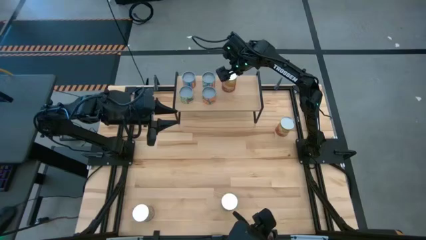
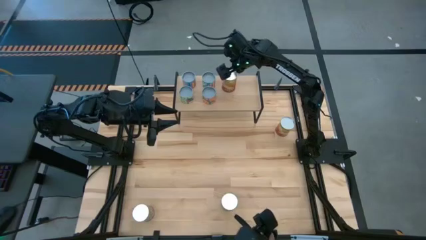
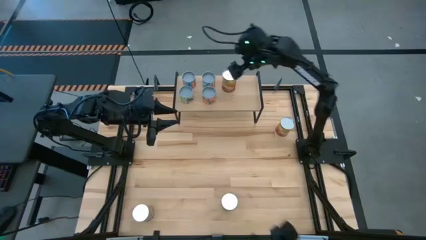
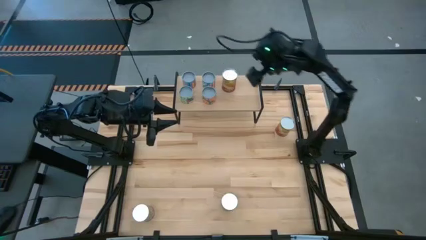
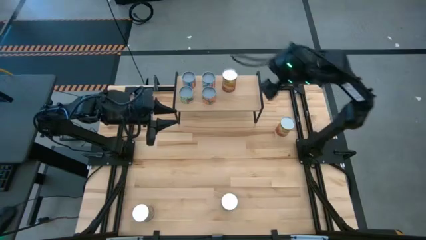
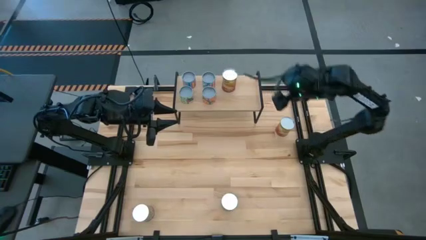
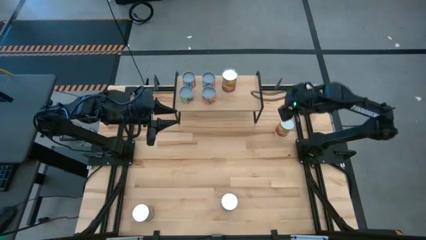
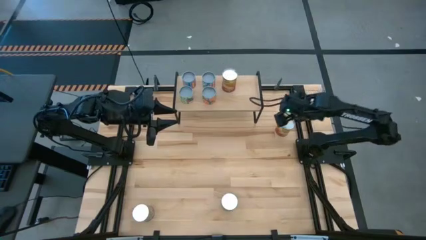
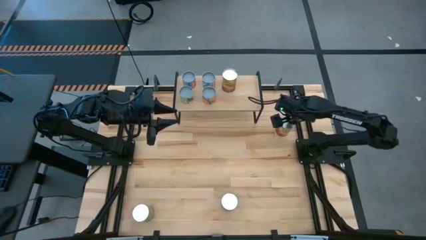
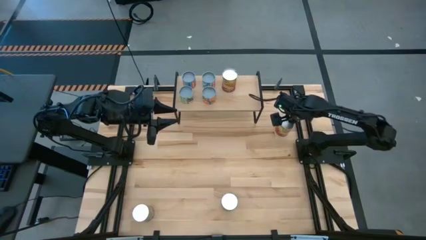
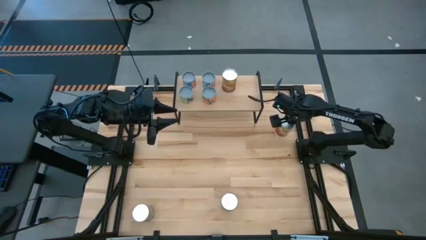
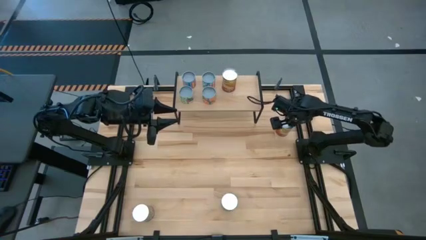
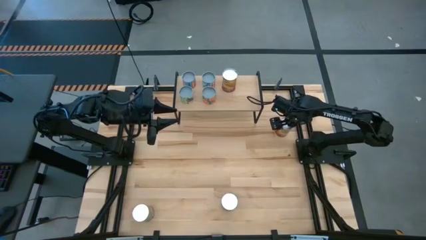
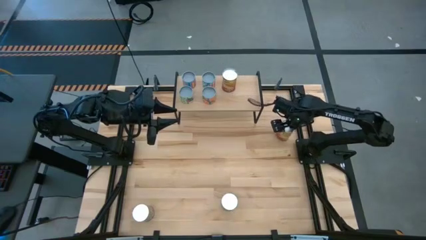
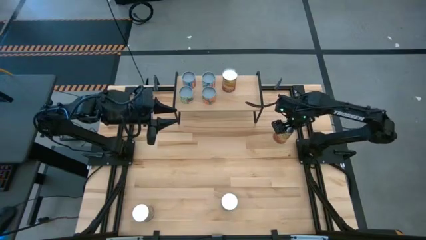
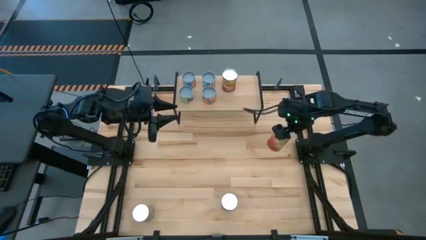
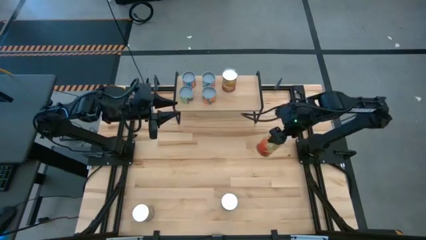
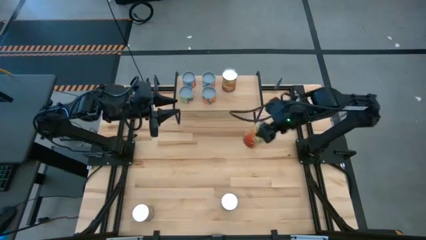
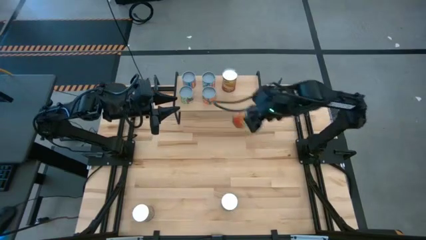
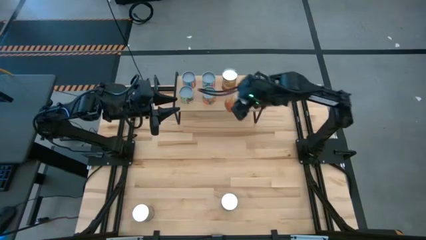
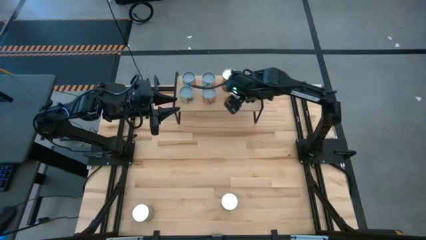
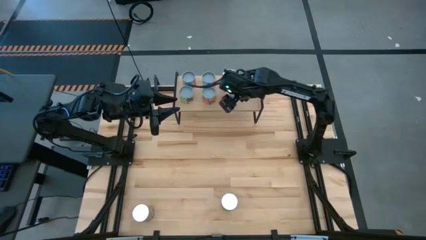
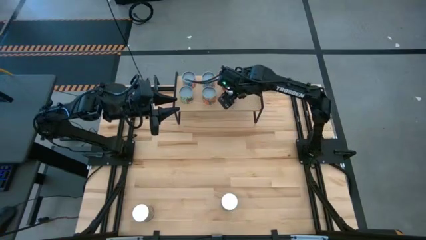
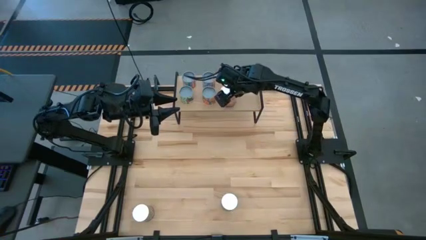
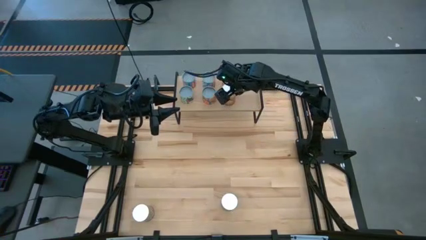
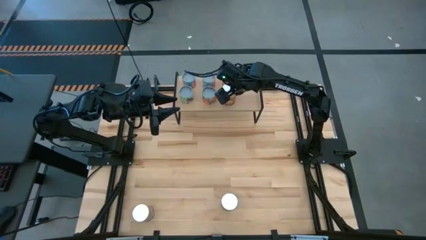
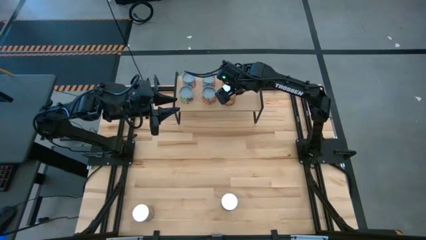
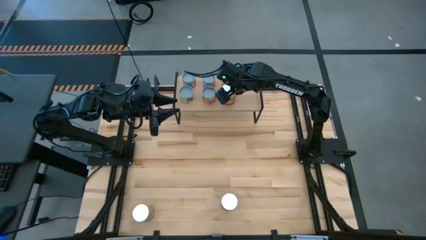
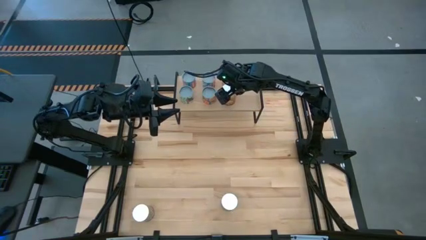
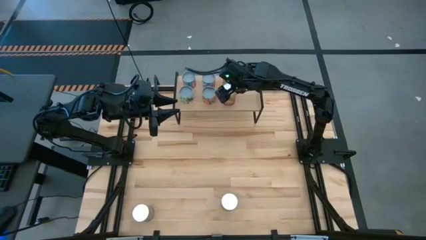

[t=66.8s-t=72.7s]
Task: Pick and place cans onto a shelf
Put the can of corn on the shelf aligned with the other can of corn

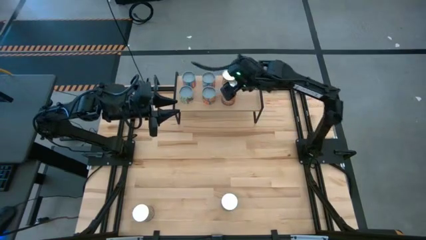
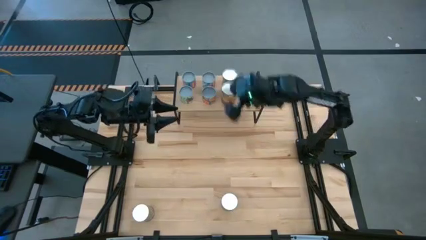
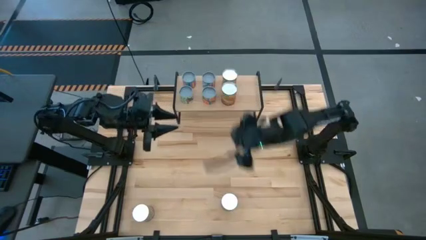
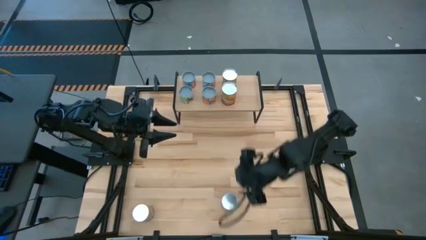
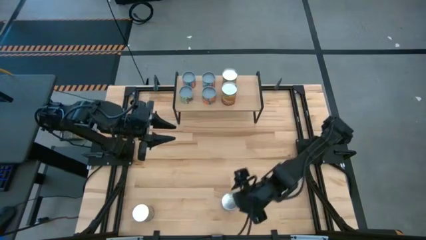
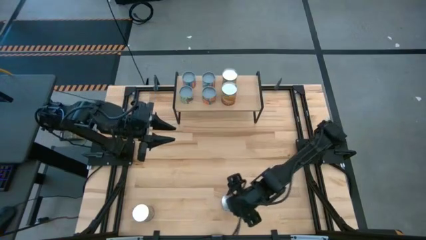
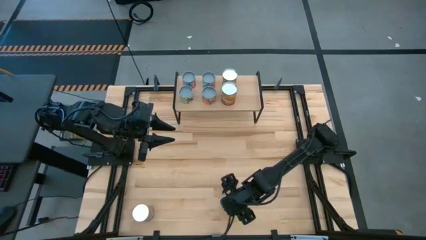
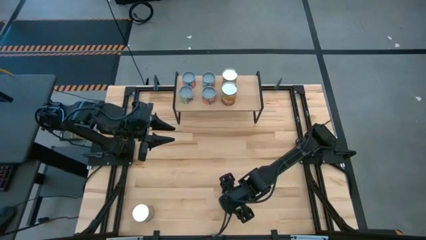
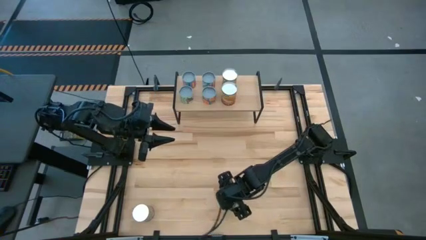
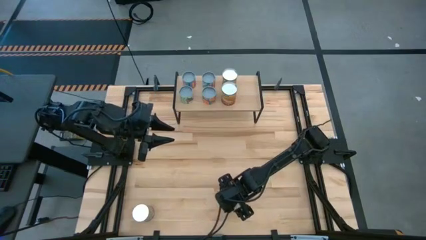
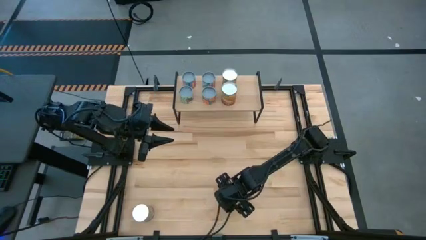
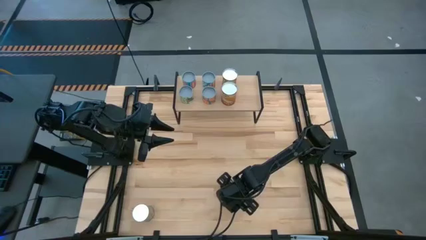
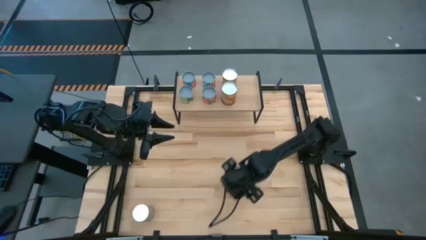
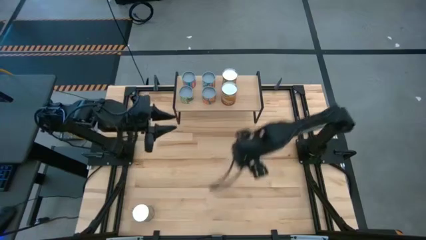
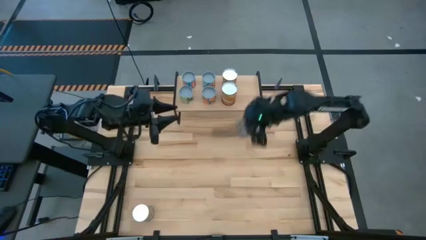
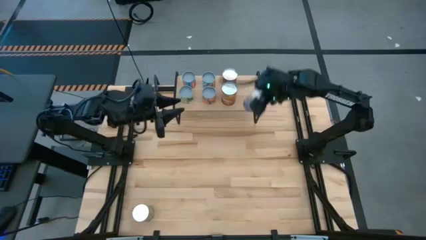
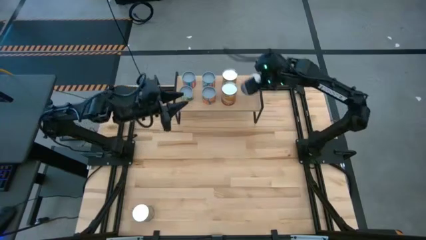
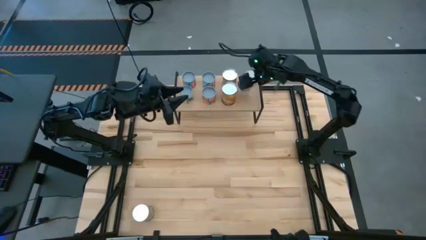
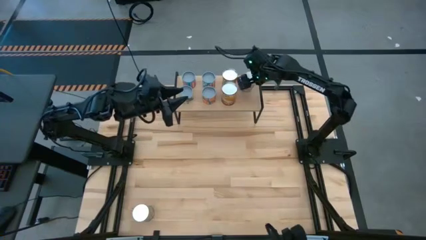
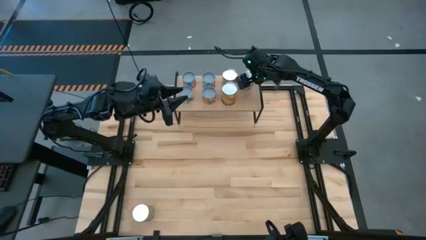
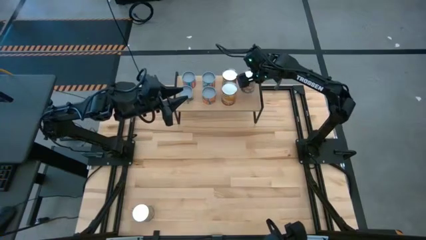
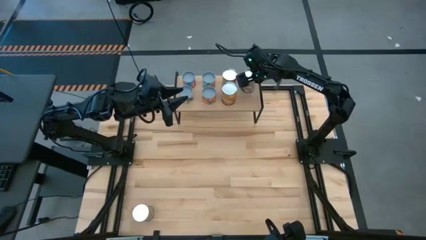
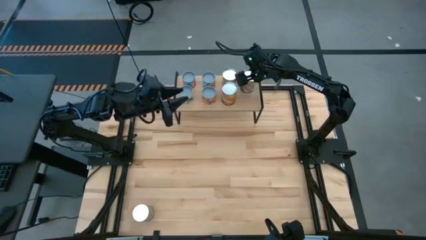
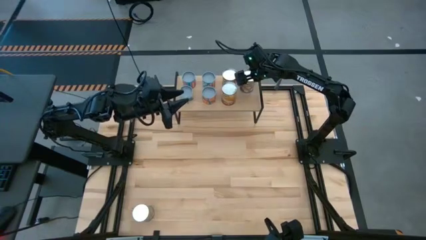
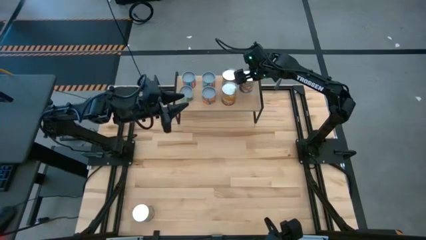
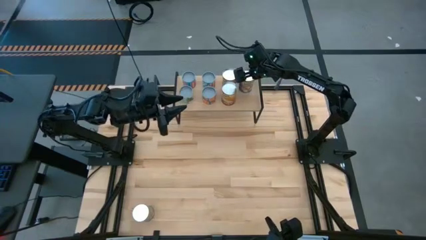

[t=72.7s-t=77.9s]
Put the right can of peaches on the shelf

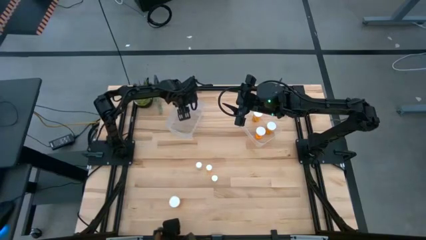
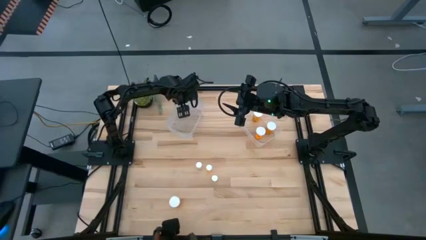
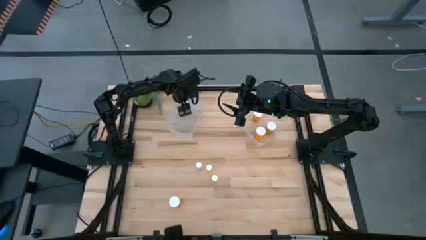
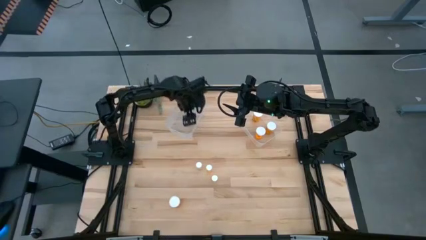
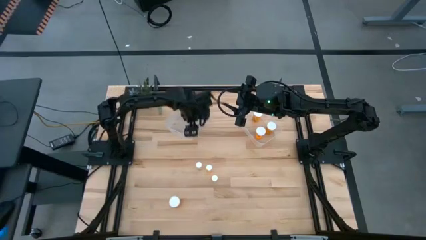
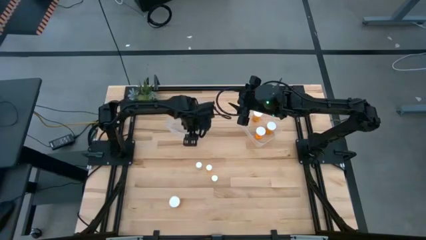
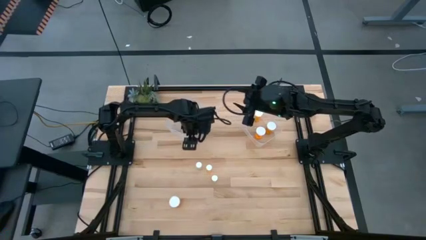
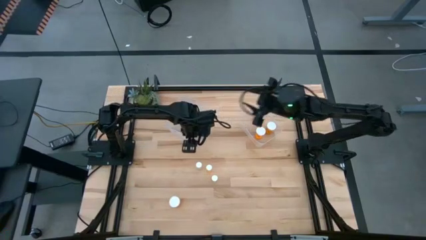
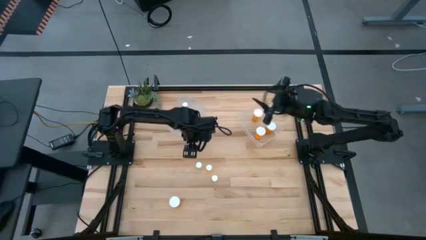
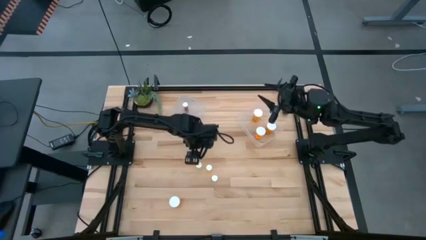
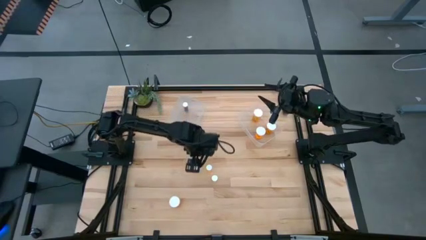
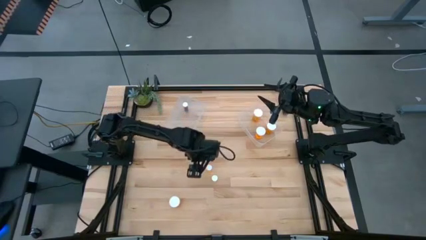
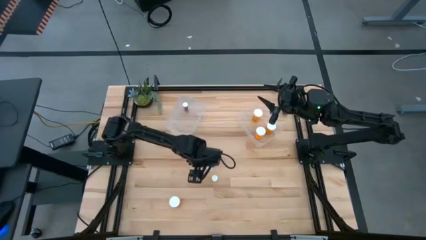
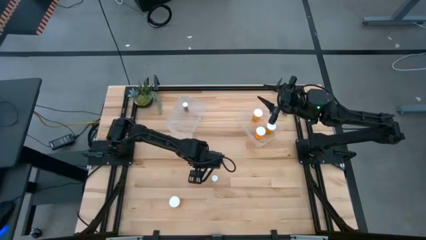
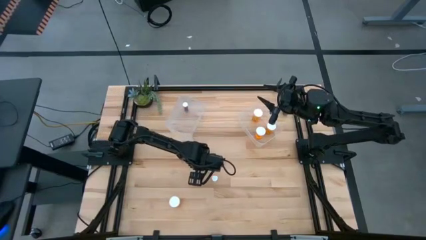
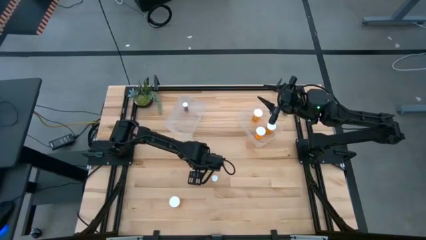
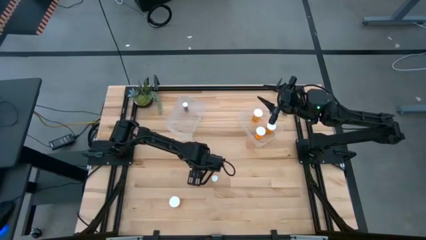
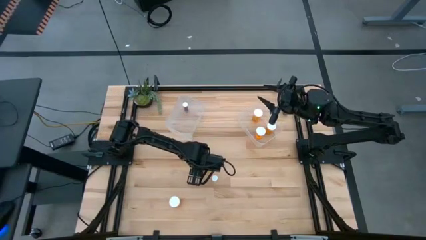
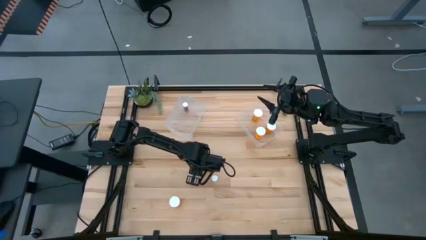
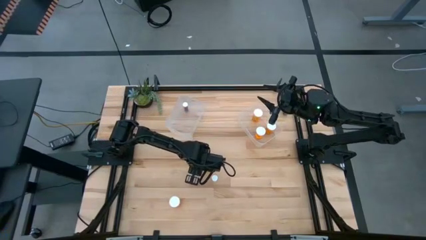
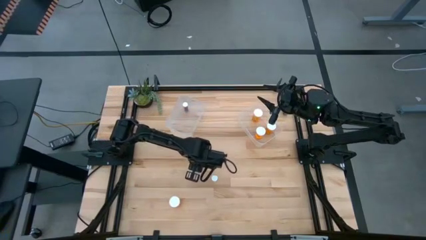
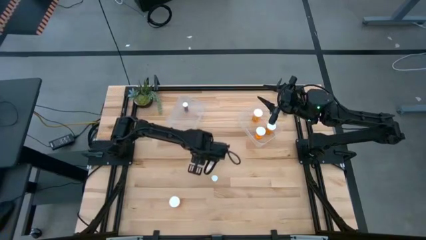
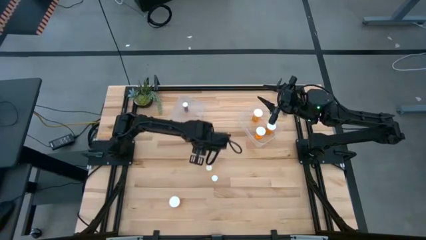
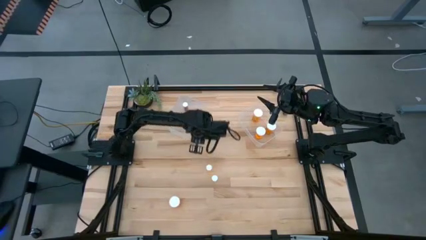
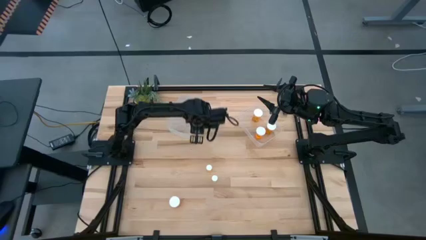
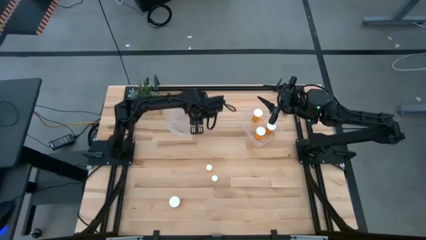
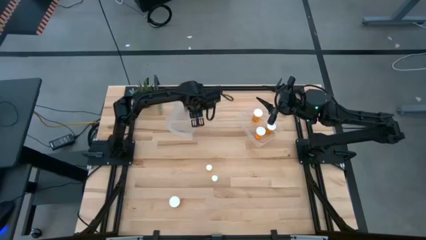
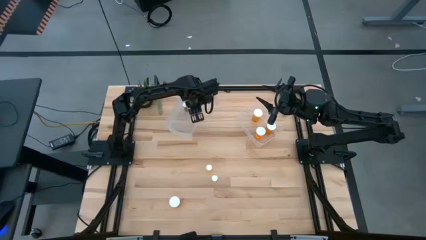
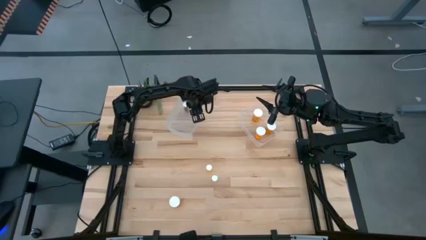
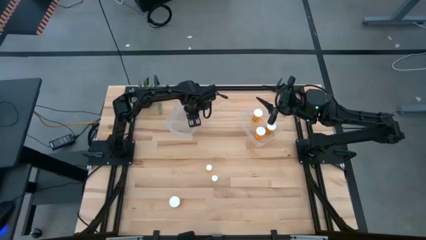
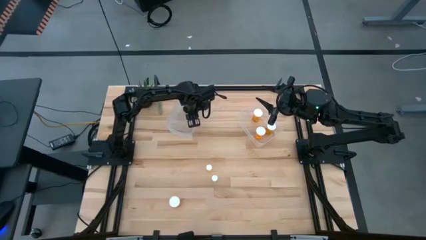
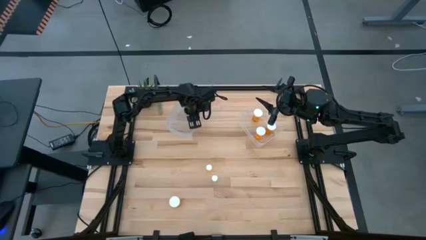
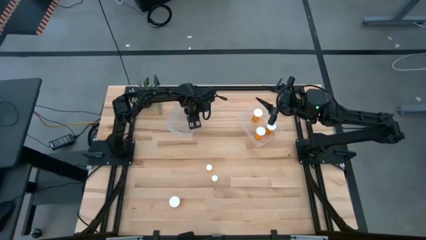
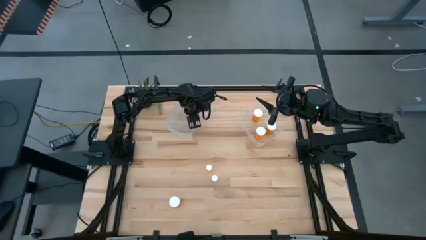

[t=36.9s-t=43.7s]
Task: Pick and place medicine bottles into bin by pill shape (circle, oval)
Put the small yellow pill bottle into the left transparent bin
